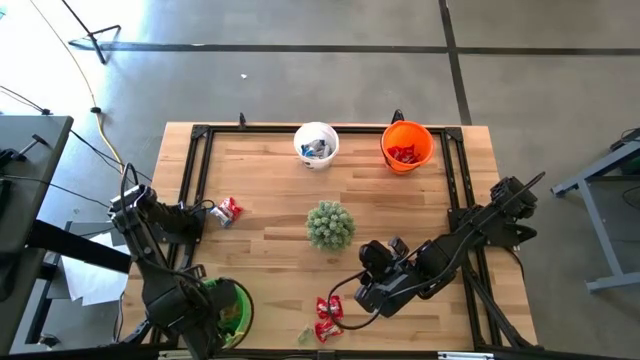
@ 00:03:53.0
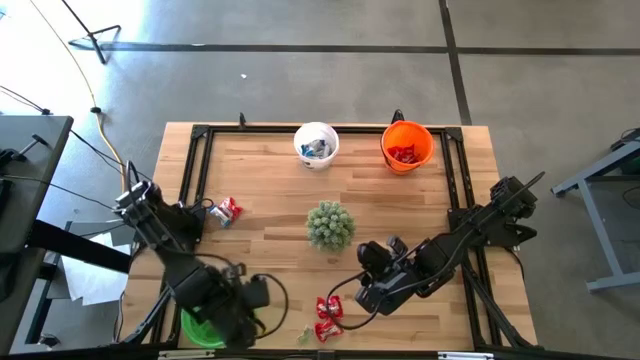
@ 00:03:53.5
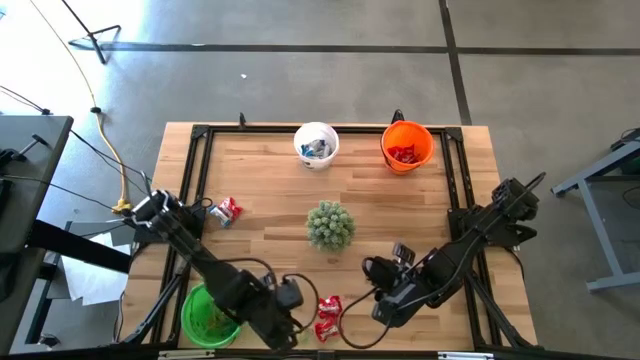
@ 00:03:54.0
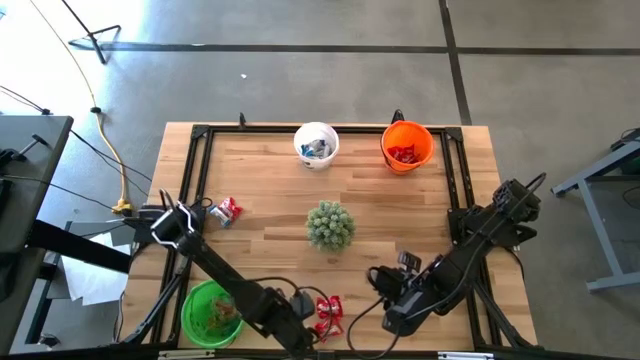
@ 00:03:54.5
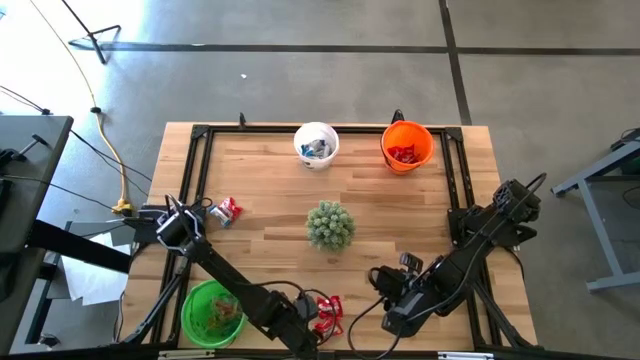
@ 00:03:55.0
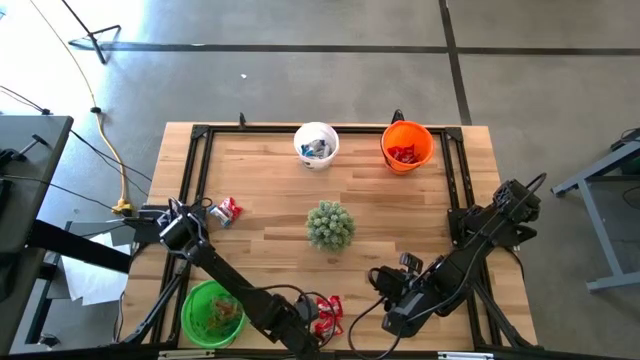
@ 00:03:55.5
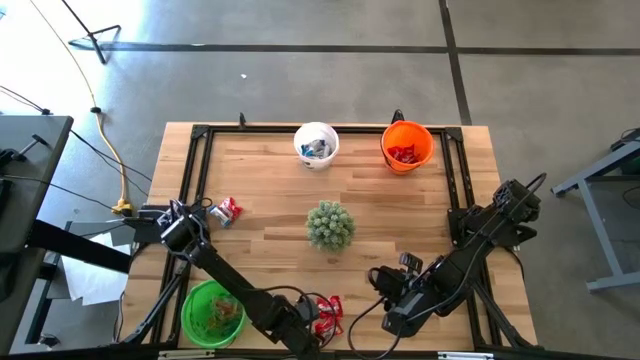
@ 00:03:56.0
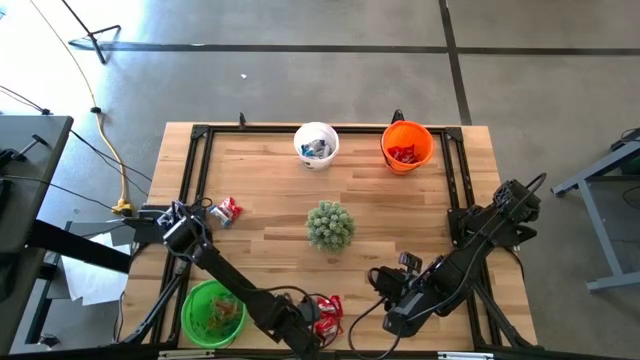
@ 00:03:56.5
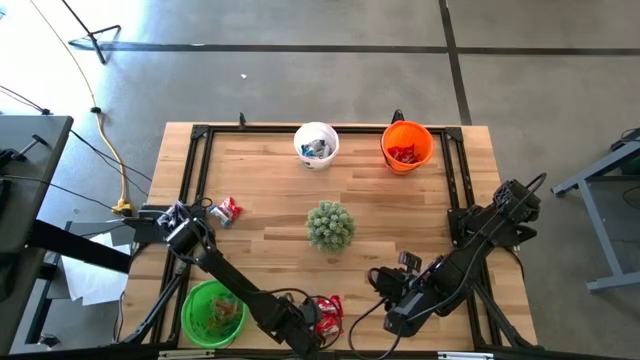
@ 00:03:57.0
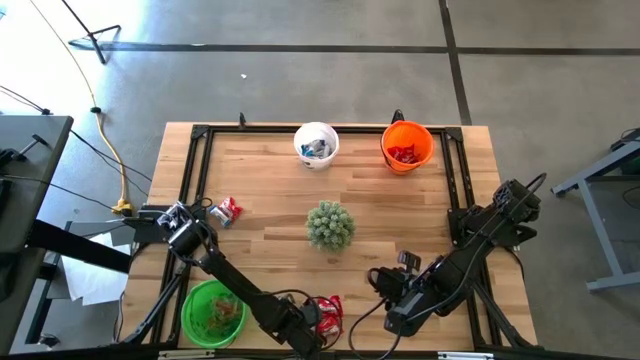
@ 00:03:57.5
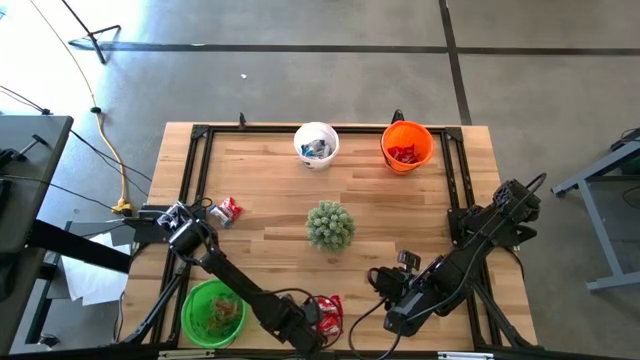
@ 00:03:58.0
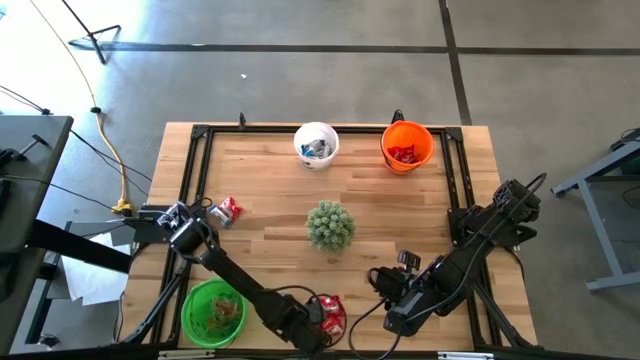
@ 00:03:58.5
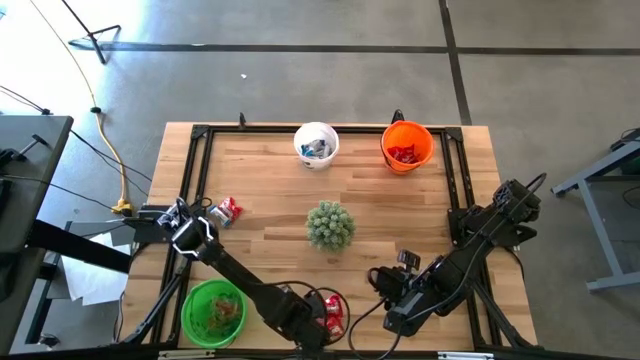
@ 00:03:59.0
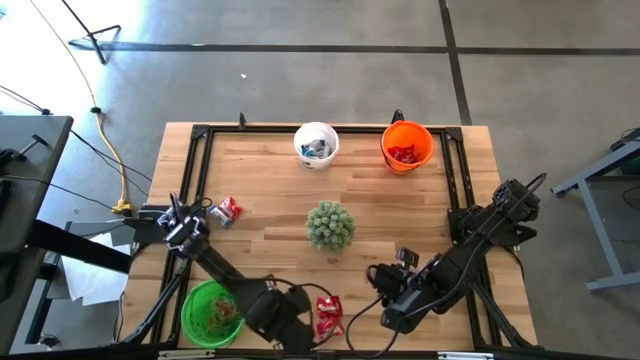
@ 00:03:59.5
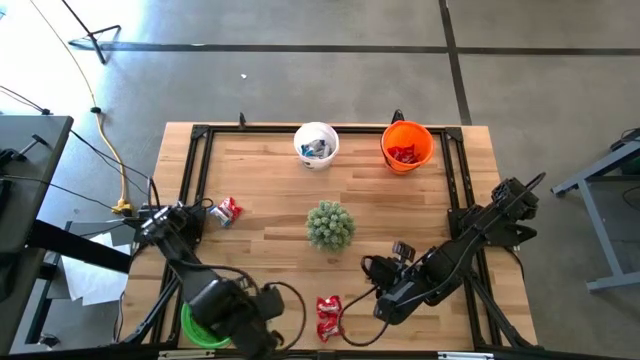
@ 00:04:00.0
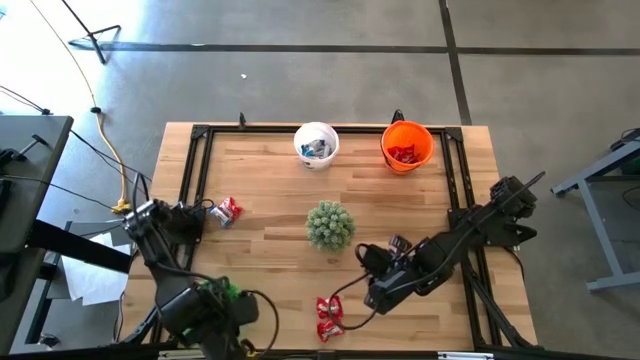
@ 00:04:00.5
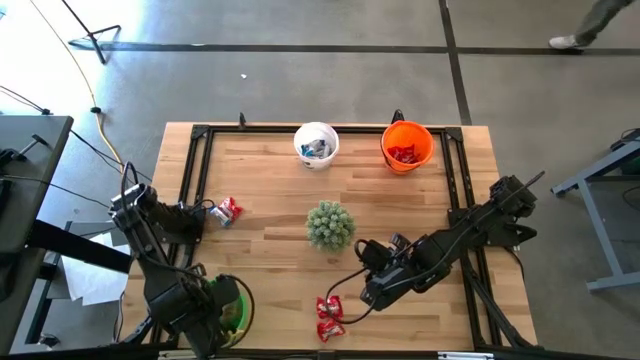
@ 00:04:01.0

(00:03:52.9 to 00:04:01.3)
Task: Sort candy
Put the green gummy into the green bucket

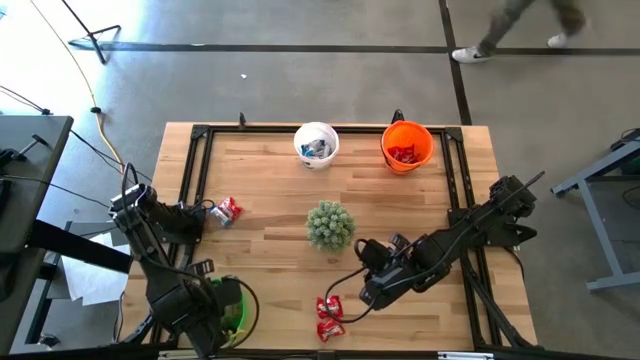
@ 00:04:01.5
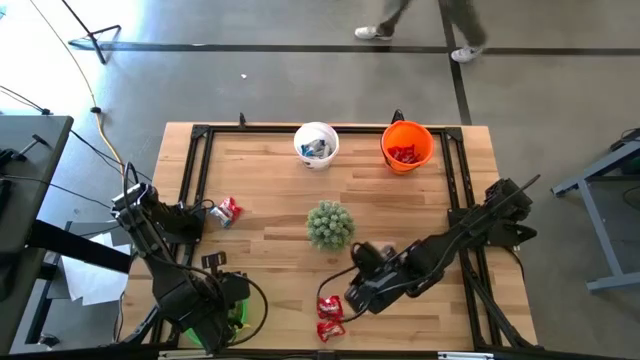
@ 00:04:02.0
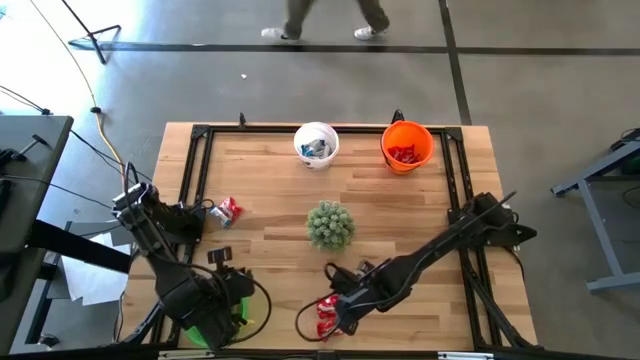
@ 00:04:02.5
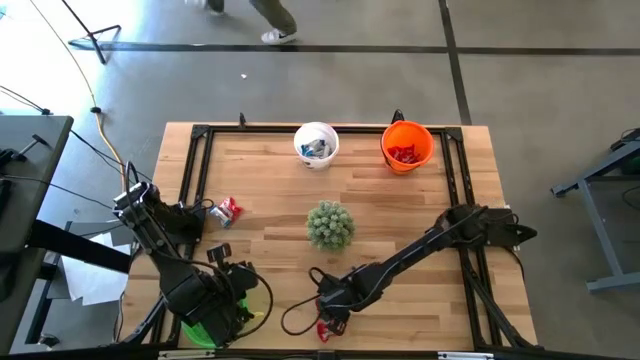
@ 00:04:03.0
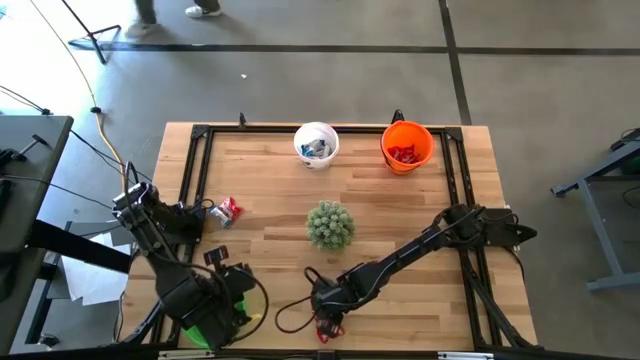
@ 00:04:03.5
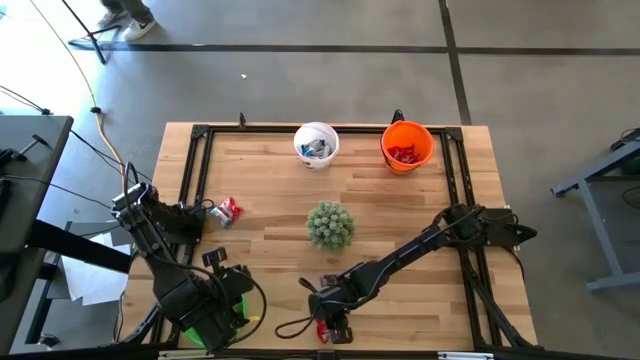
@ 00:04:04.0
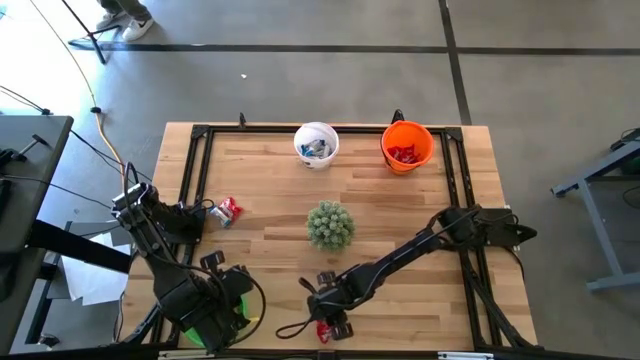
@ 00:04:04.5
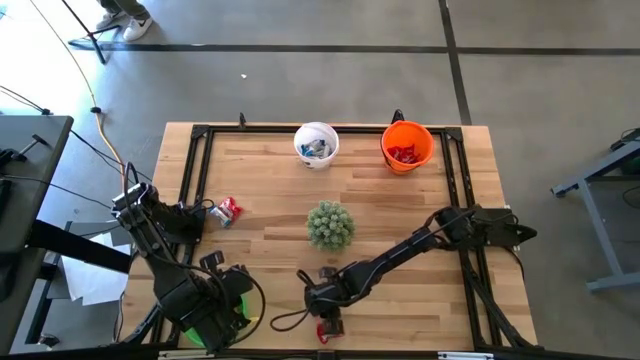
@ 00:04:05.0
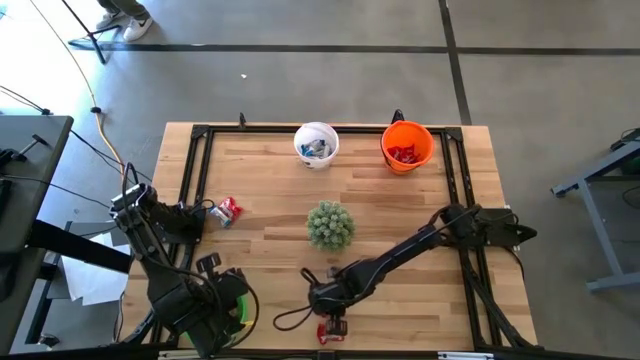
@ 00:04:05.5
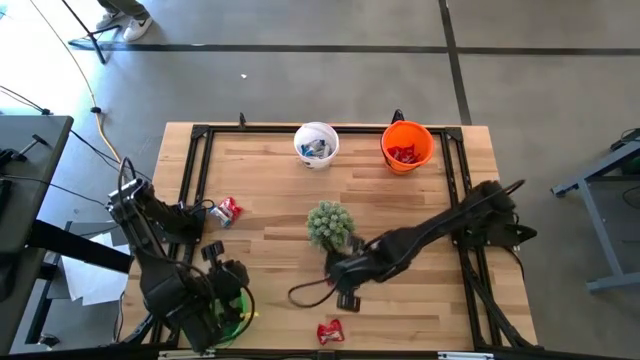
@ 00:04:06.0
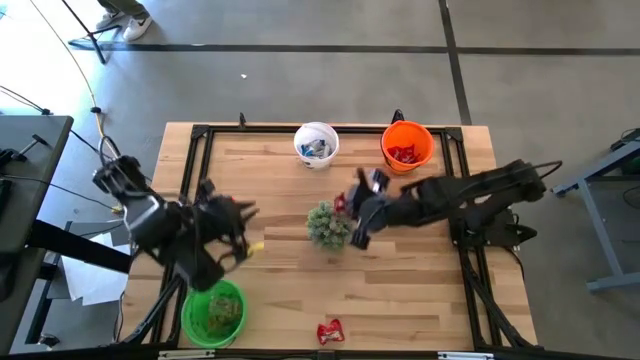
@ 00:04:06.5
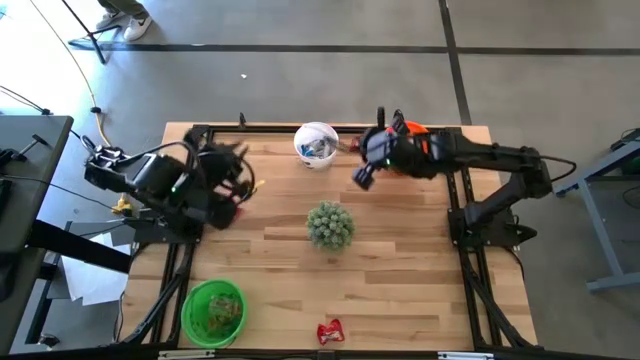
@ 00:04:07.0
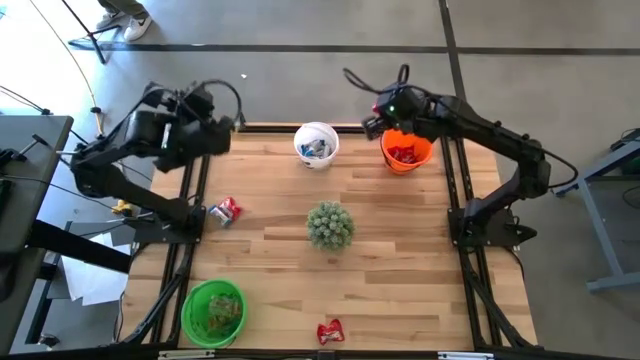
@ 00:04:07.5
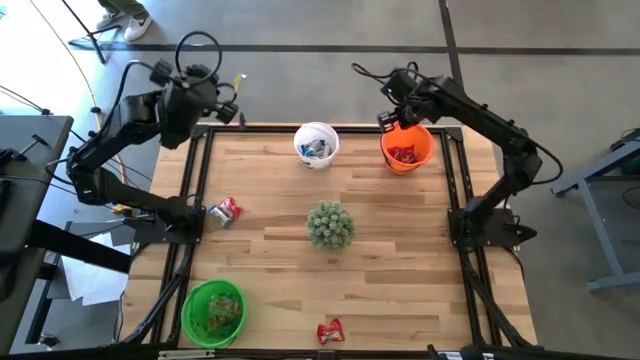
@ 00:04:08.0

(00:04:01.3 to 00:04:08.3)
Put the red candy into the orange bucket

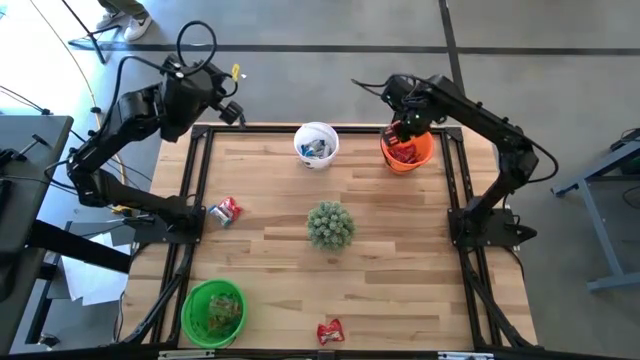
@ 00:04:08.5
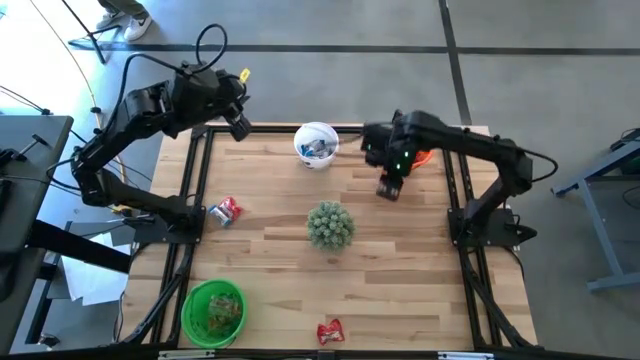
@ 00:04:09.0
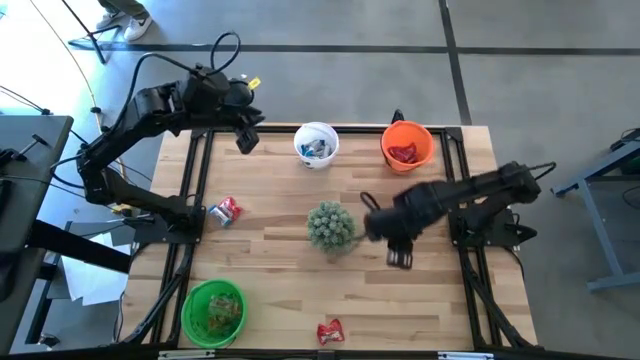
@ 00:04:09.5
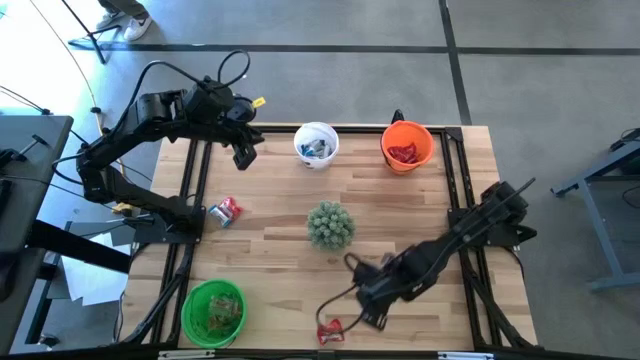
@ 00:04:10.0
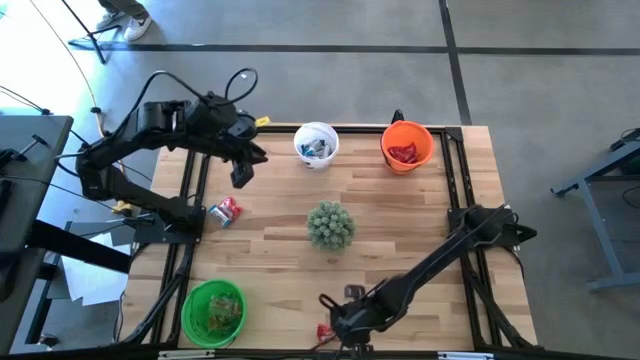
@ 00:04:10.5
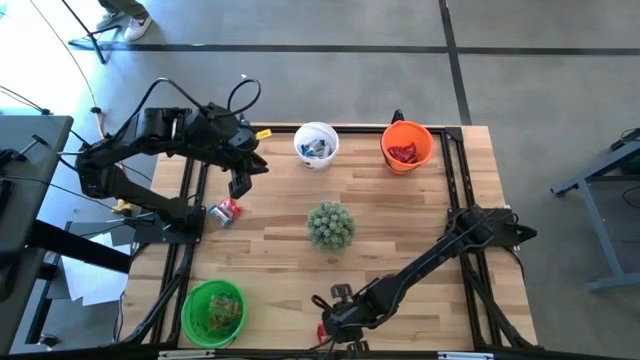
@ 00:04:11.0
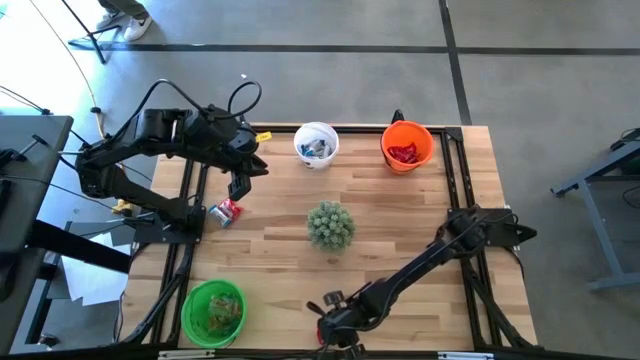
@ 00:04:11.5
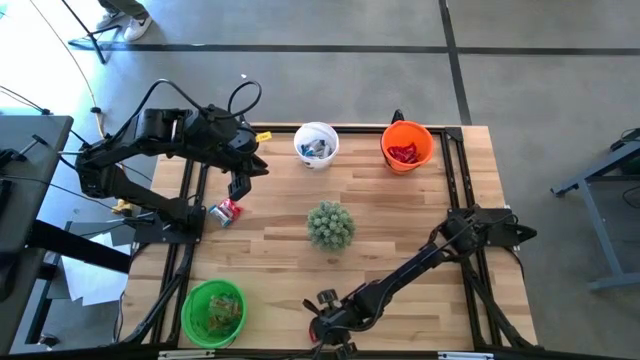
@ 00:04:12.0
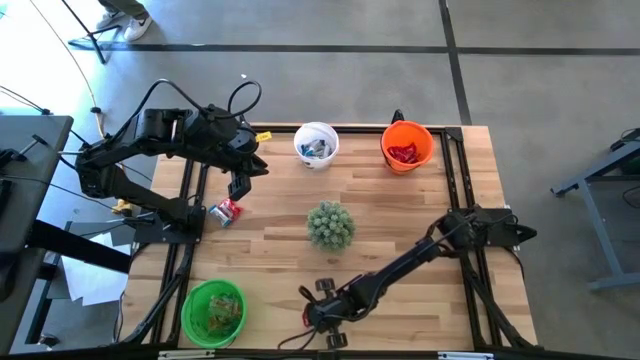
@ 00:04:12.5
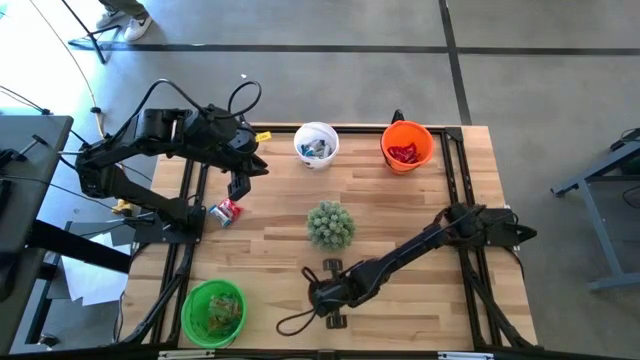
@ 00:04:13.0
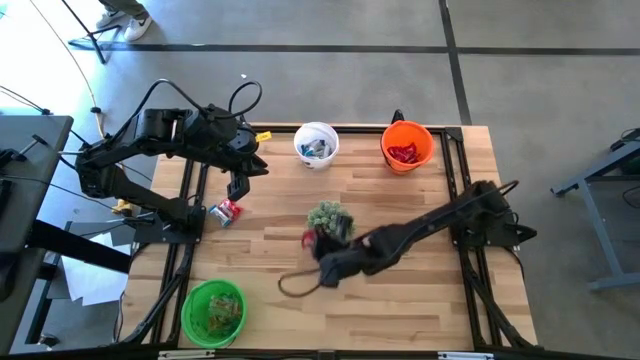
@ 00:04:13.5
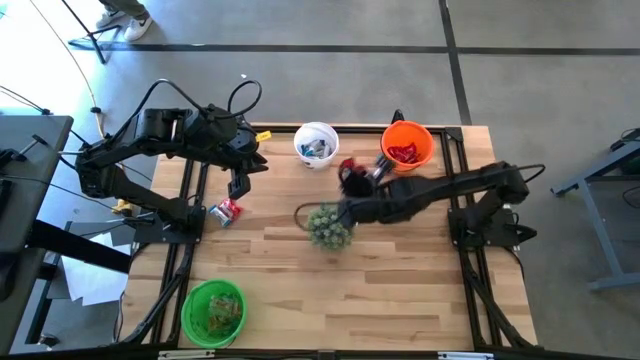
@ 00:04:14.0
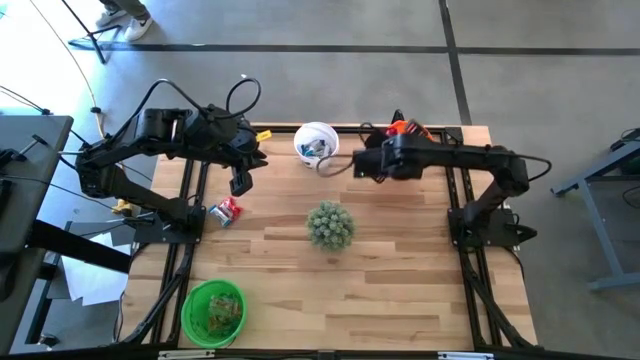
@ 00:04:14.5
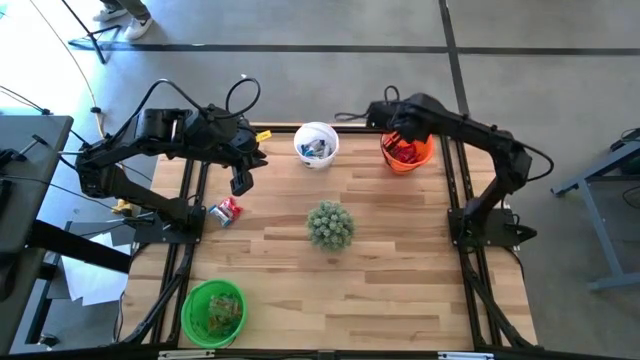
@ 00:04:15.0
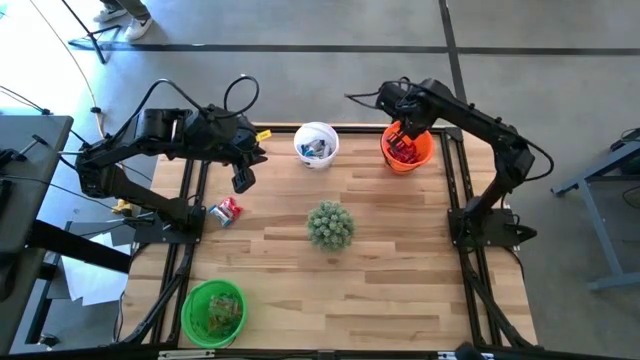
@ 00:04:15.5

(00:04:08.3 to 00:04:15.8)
Put the red candy into the orange bucket
